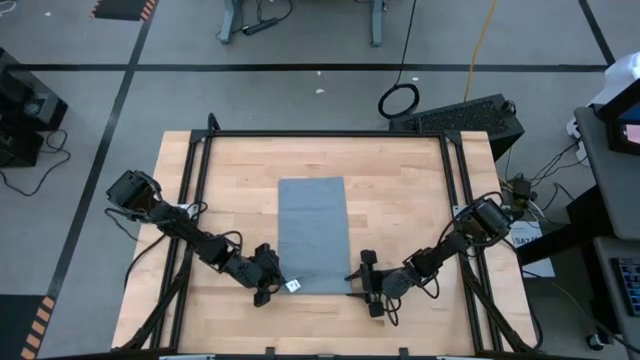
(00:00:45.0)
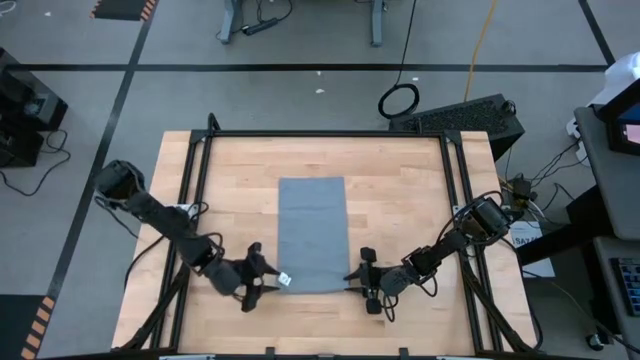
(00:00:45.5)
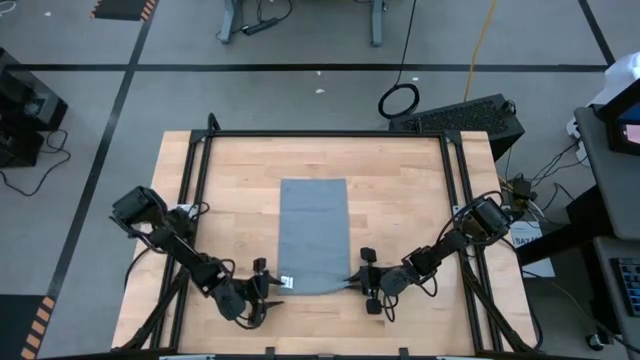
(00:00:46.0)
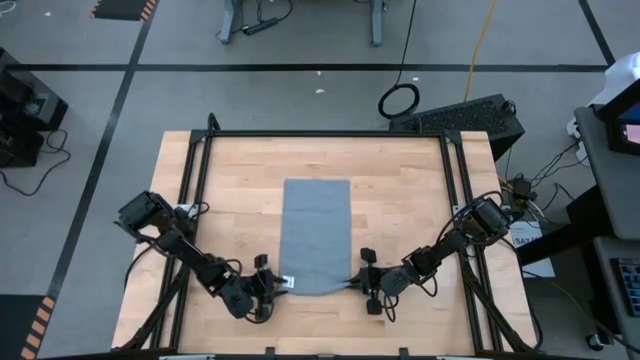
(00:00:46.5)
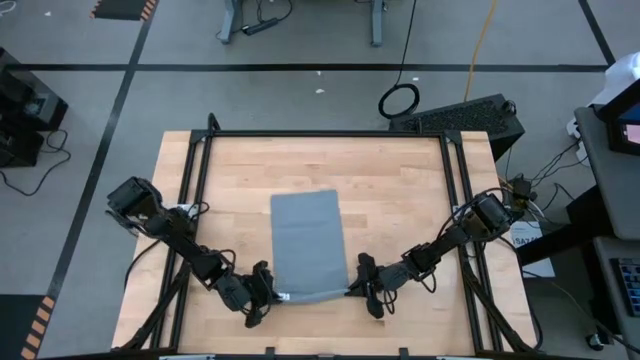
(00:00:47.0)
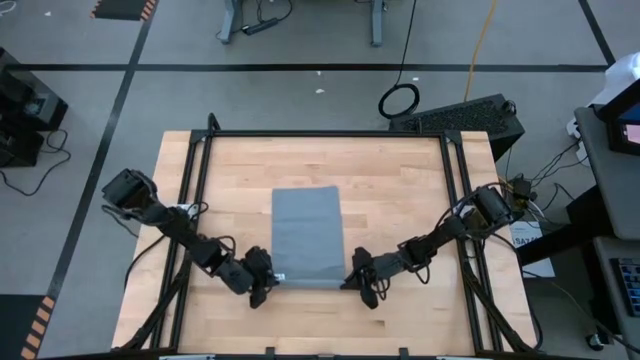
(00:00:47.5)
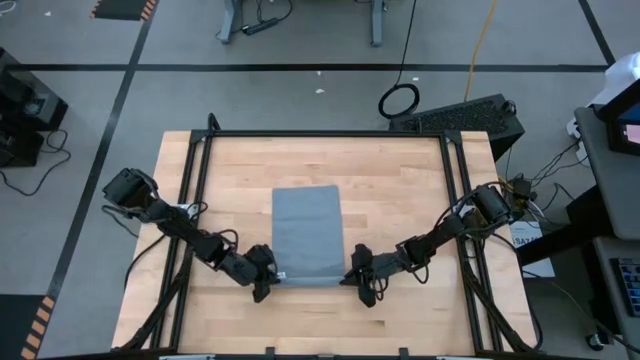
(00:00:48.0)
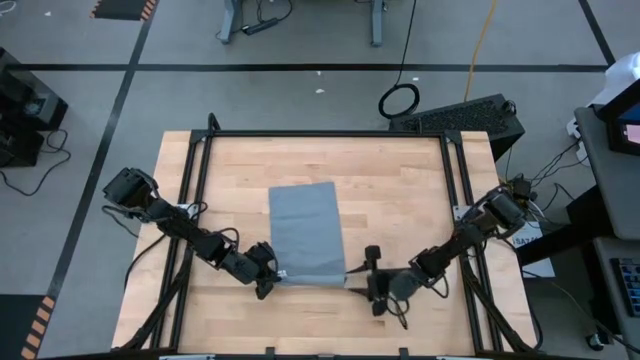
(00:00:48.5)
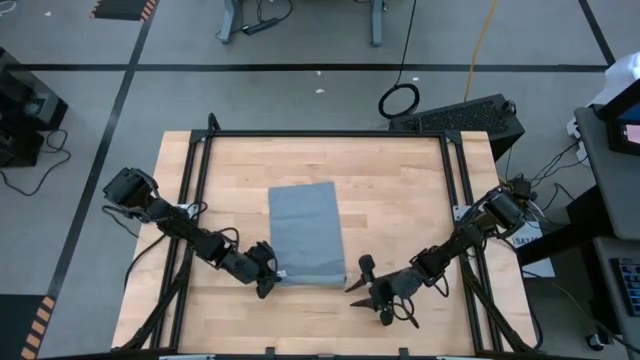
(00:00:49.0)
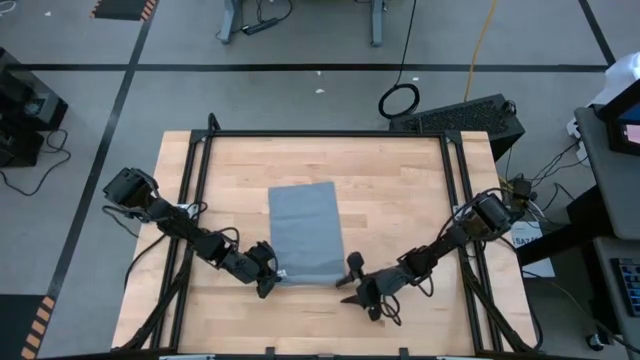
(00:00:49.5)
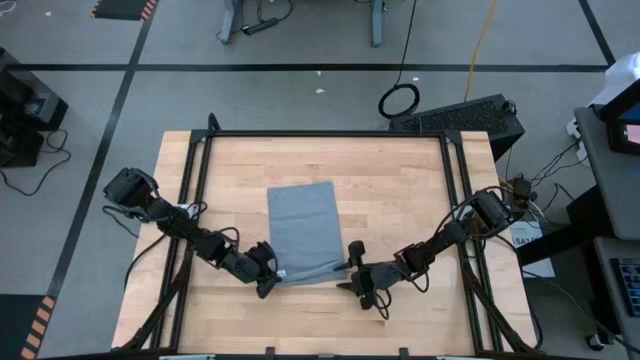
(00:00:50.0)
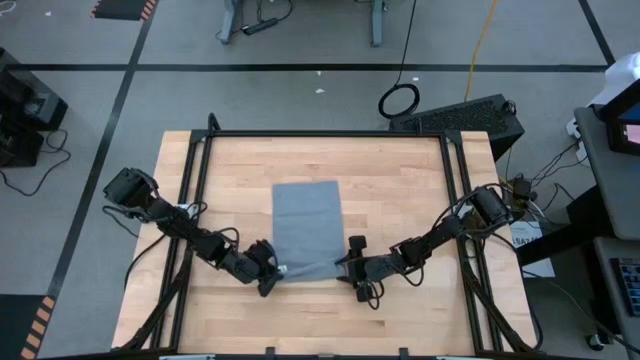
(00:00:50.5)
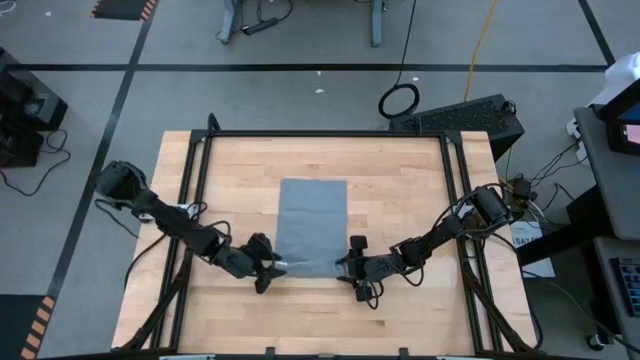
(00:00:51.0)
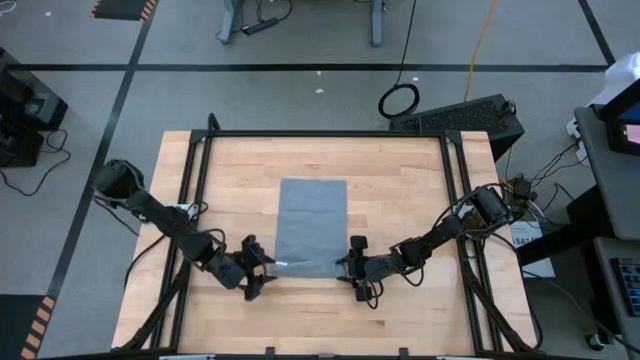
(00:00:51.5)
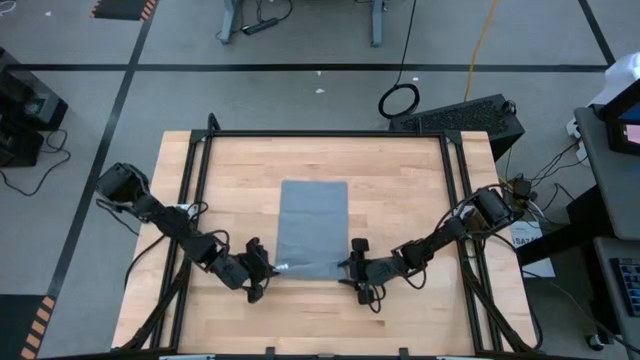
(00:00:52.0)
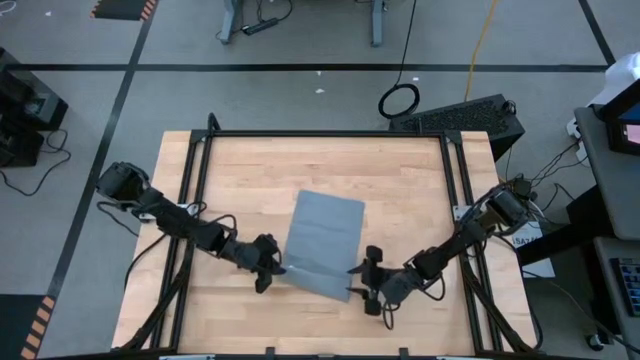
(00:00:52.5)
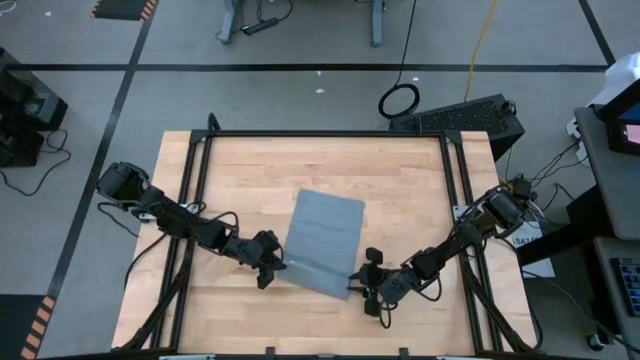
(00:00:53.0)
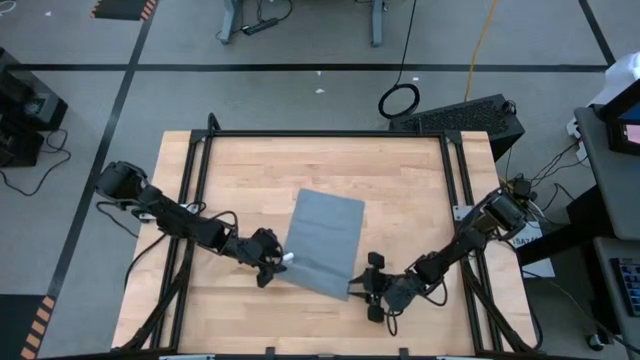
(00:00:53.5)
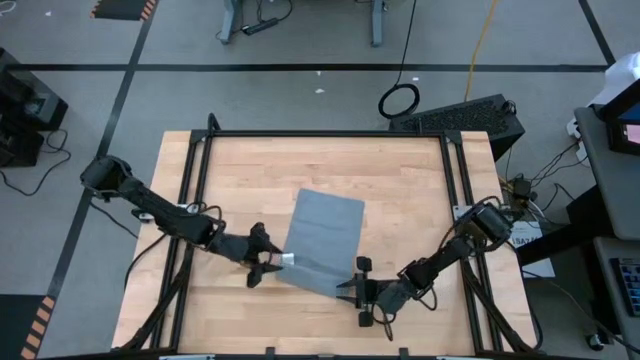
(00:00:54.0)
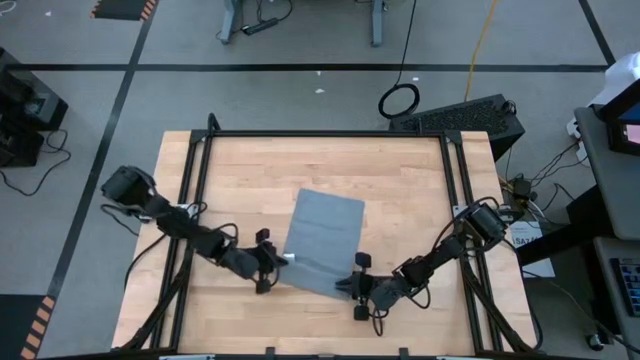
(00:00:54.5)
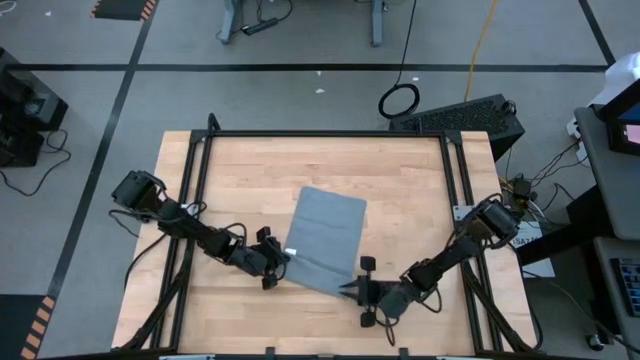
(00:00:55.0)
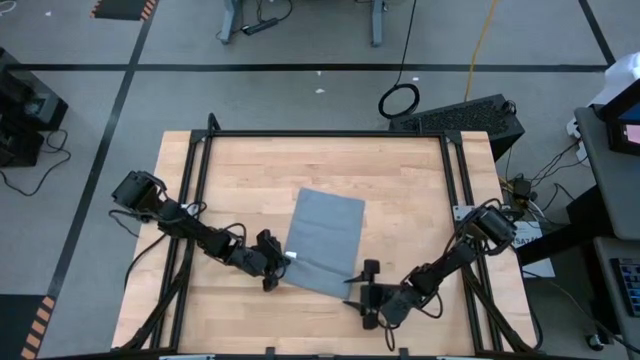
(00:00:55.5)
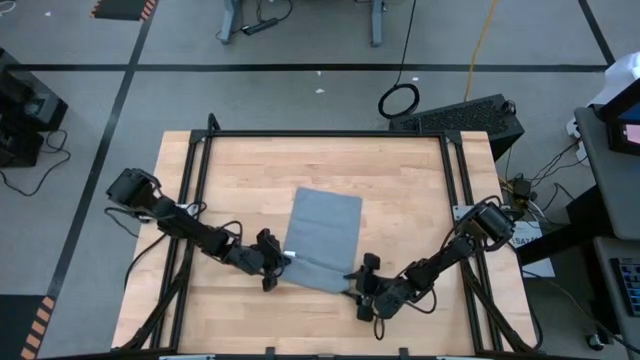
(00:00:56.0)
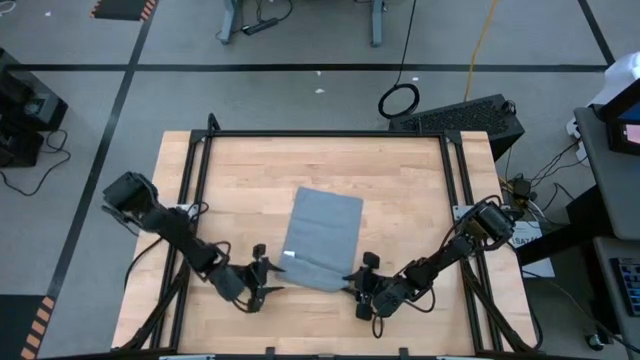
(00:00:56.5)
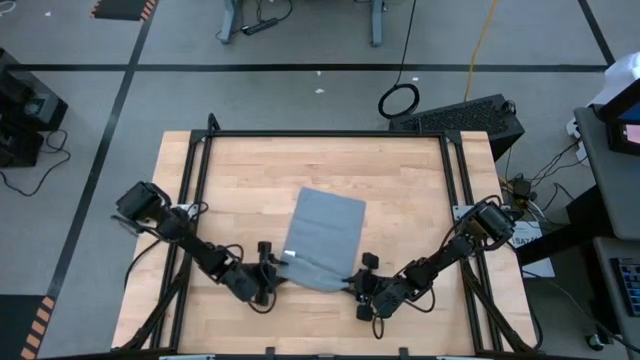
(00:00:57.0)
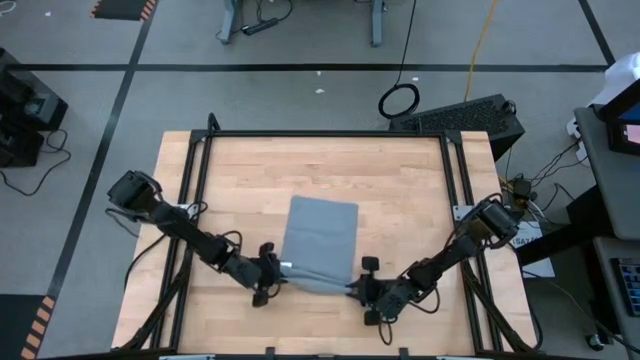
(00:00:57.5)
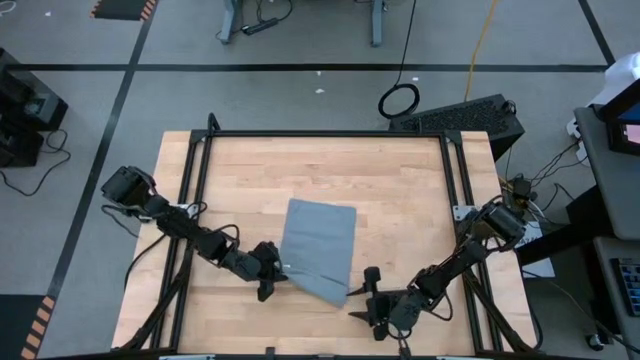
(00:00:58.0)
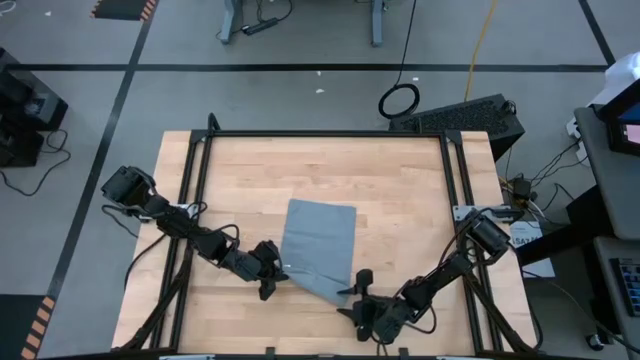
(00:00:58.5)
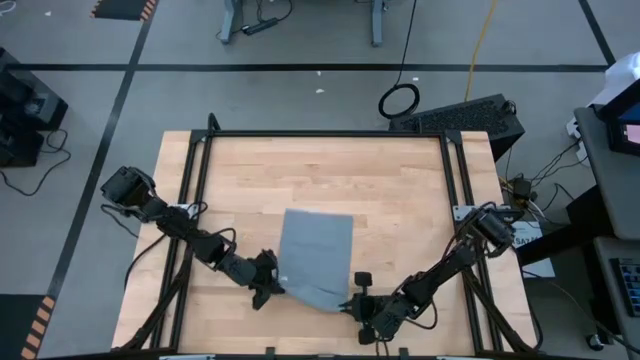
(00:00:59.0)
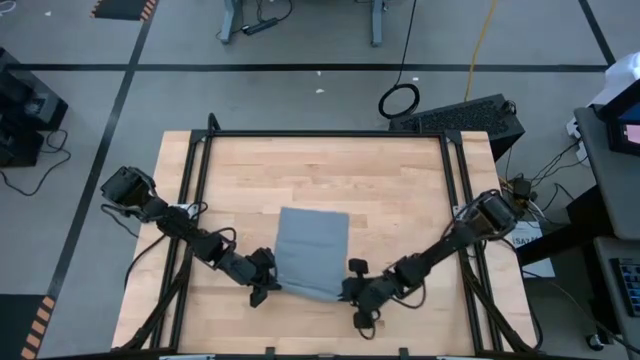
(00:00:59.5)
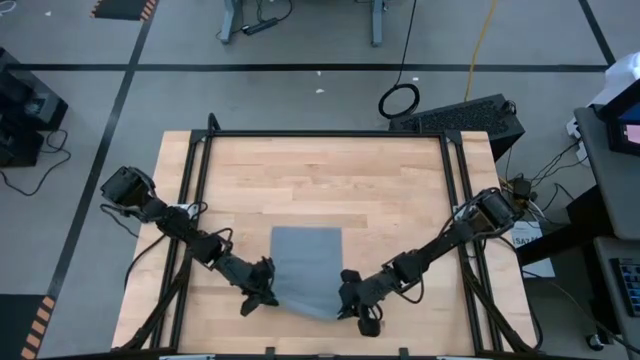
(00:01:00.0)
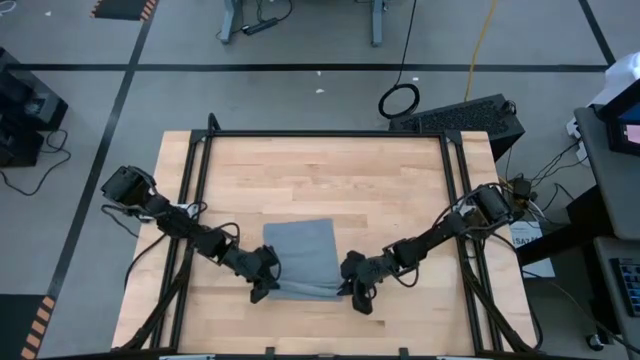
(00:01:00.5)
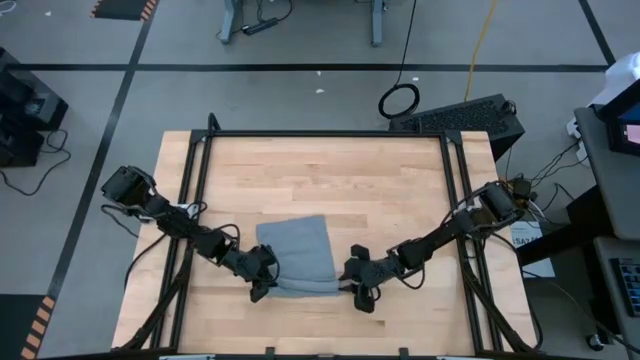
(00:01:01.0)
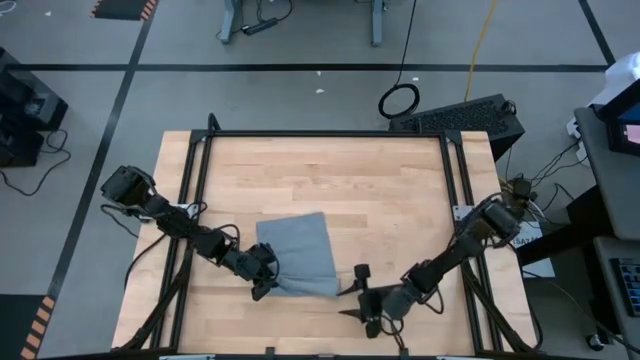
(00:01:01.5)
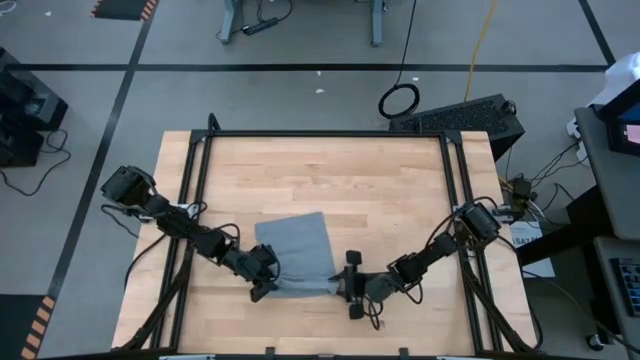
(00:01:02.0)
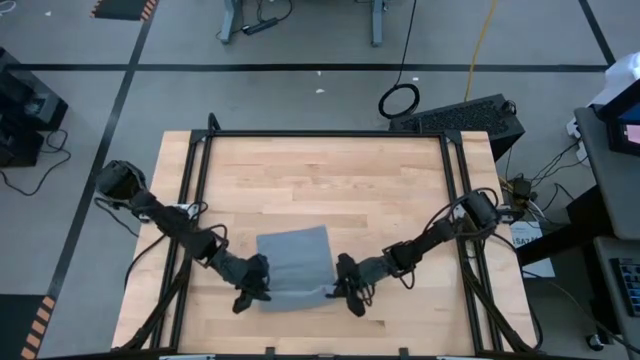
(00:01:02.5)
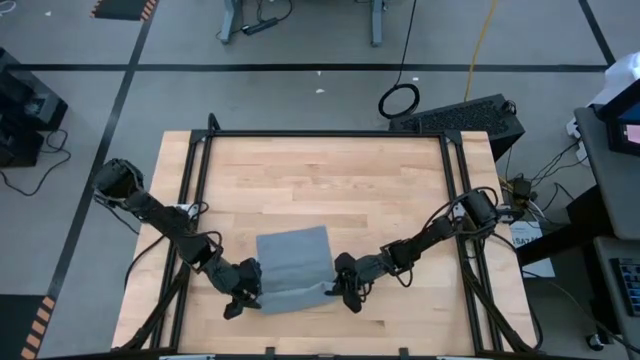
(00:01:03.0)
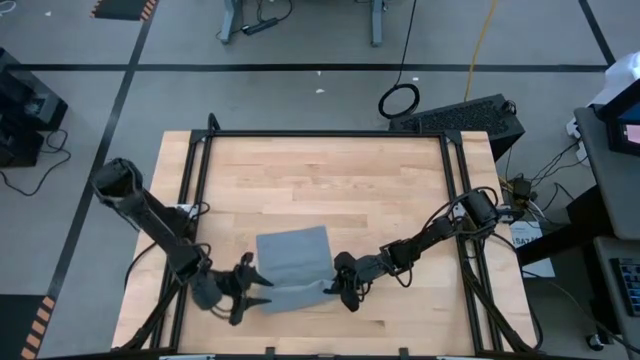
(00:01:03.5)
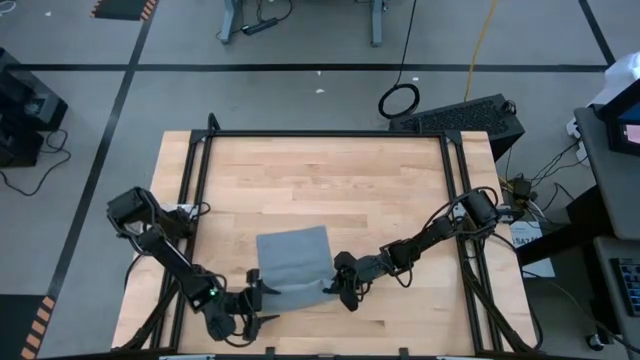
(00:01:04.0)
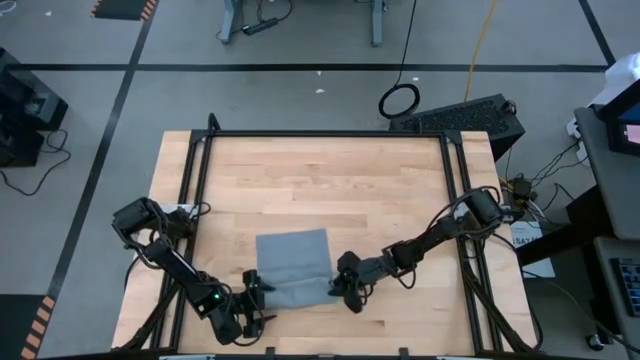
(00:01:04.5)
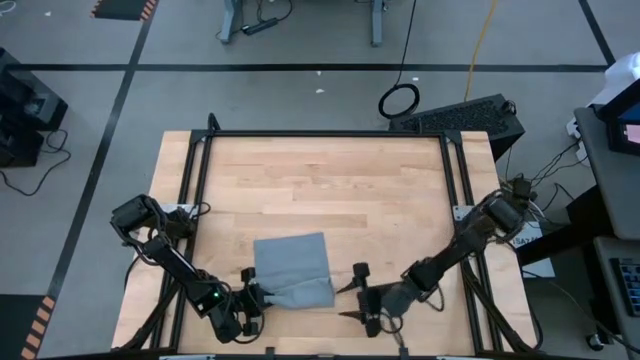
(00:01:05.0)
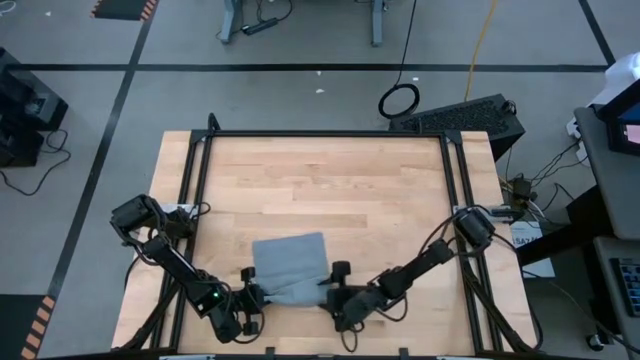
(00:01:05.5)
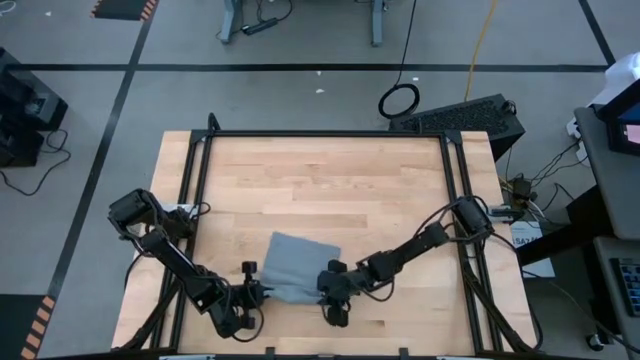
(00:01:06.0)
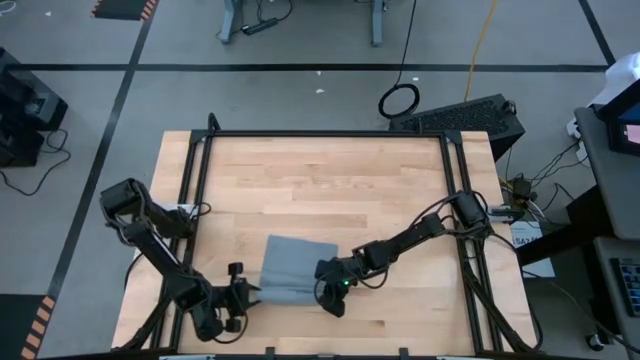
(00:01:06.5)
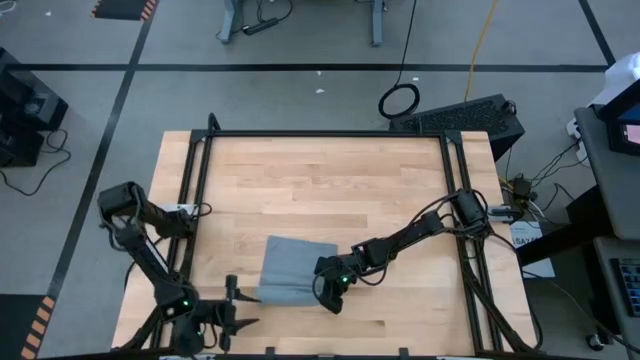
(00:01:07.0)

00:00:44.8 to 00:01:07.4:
Task: Roll towel
Roll the gray towel
